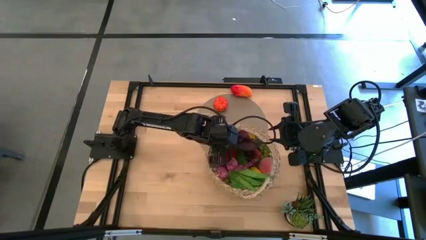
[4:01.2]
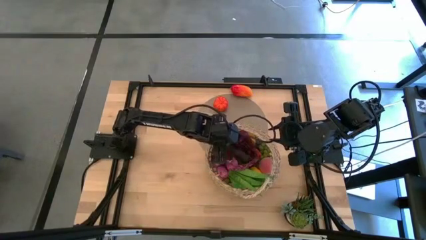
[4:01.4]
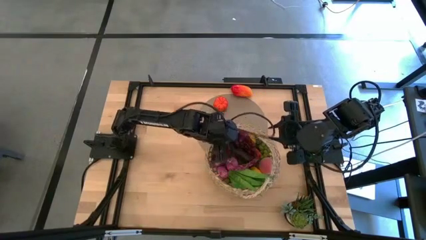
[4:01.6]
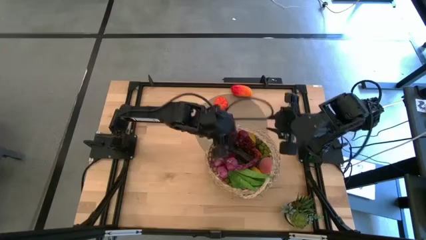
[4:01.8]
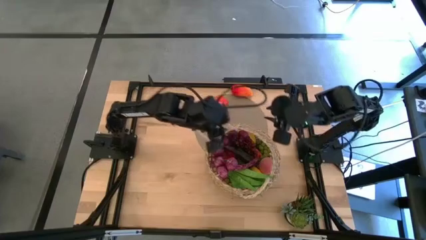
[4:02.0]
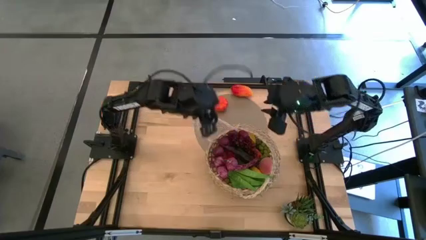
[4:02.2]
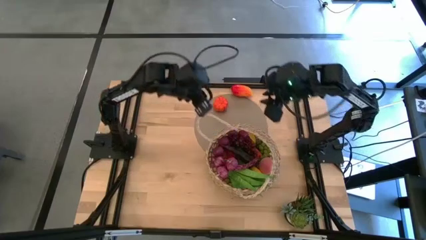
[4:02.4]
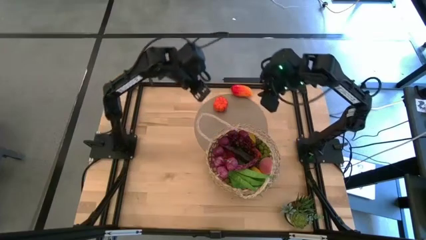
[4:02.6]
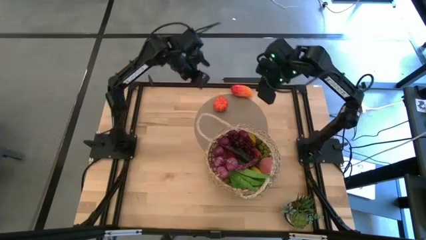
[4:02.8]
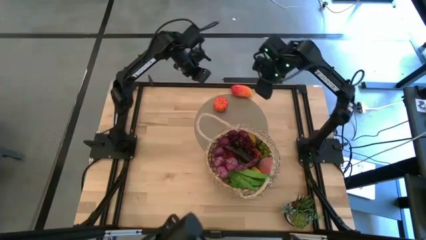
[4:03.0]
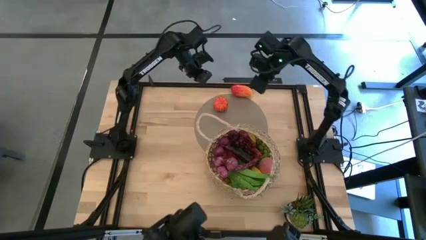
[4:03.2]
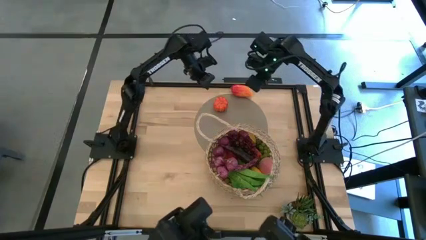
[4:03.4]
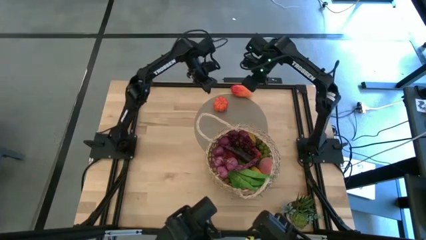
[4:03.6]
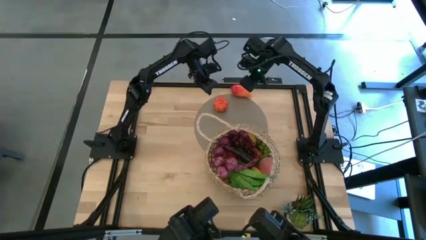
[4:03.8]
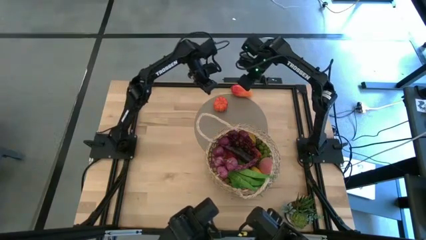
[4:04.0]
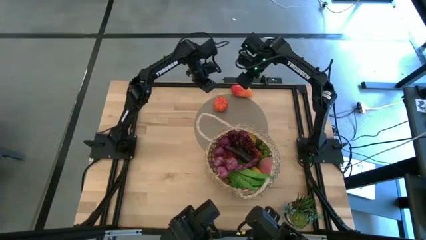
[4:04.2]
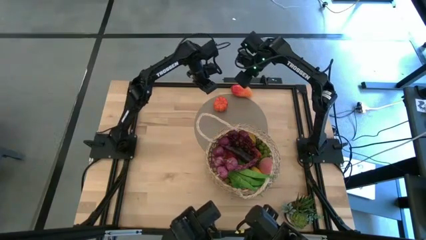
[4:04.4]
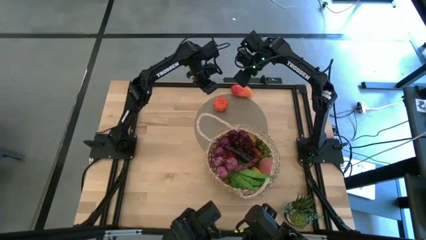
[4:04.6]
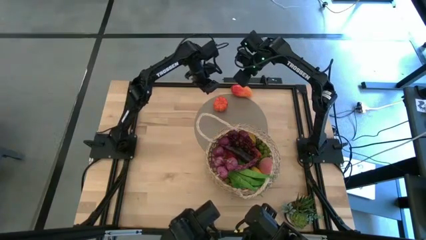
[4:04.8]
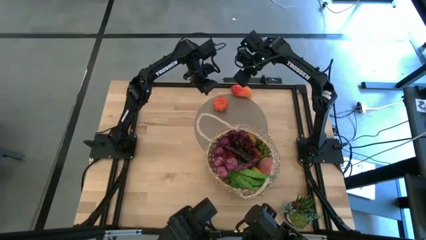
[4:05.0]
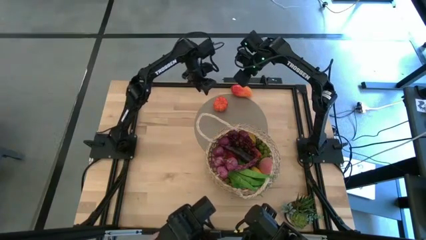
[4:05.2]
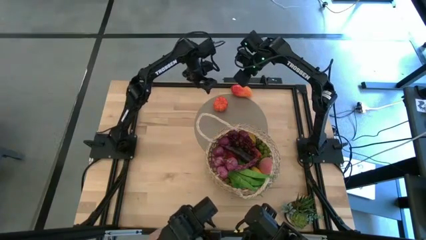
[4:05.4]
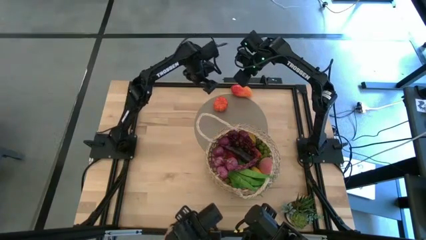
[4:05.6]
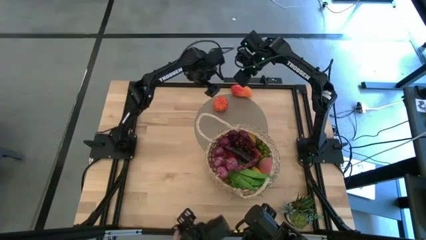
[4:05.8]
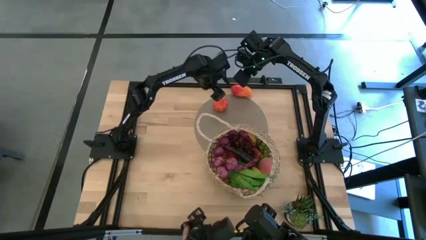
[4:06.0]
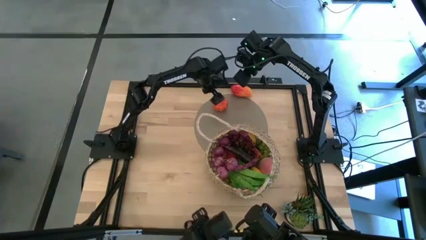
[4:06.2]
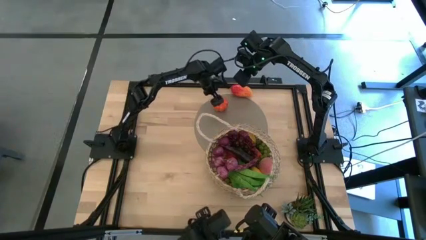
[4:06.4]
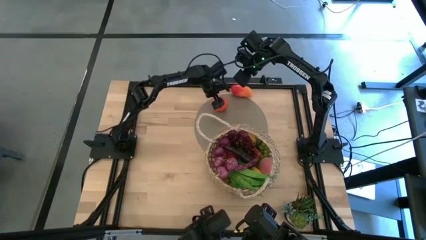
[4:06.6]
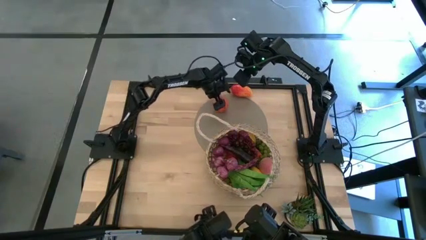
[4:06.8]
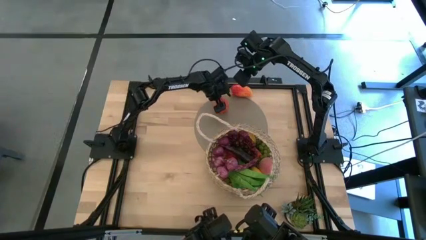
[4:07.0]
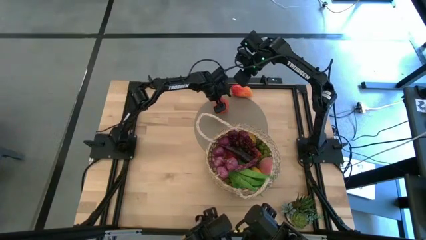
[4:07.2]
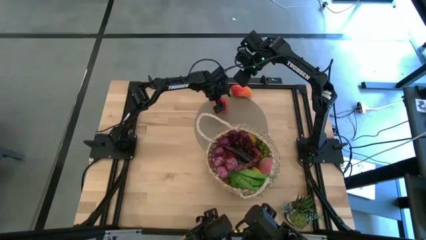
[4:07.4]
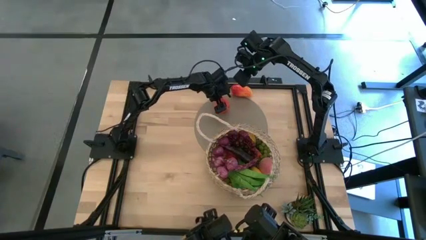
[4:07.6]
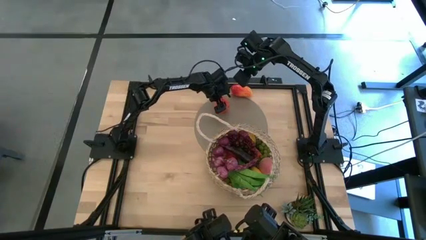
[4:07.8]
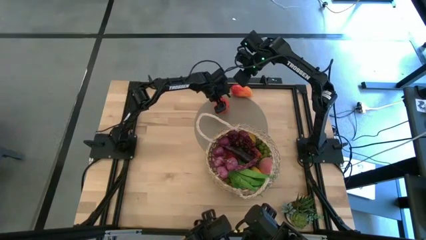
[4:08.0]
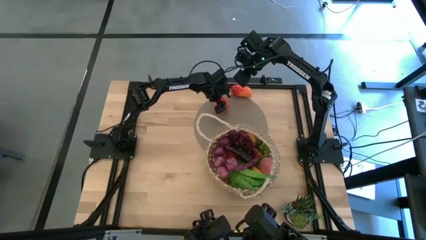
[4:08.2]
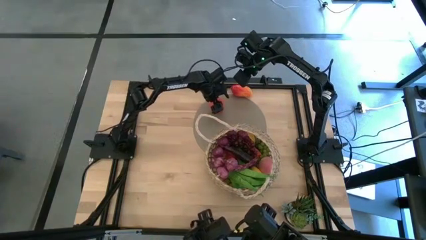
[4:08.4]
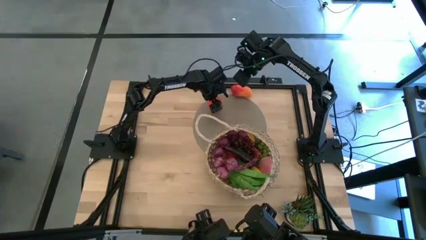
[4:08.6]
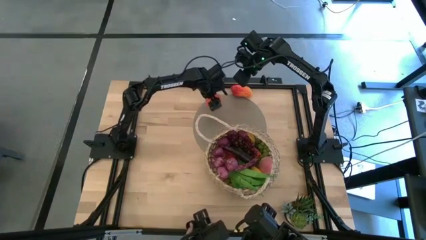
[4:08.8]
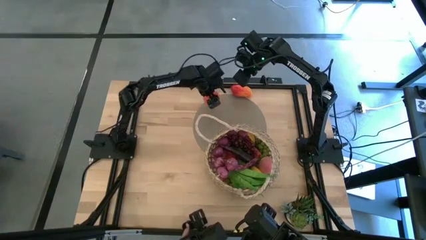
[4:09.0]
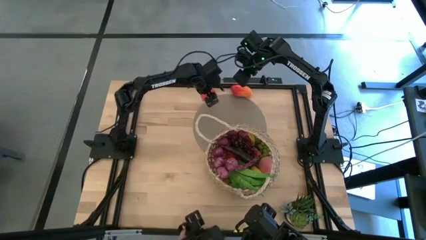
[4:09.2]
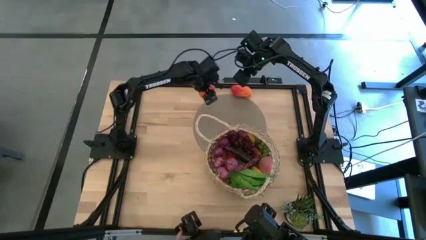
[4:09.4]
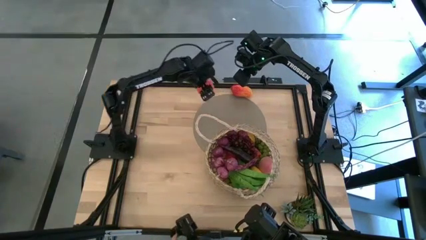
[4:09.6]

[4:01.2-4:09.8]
Task: Build produce basket
Put the orange tangerine into the brown basket

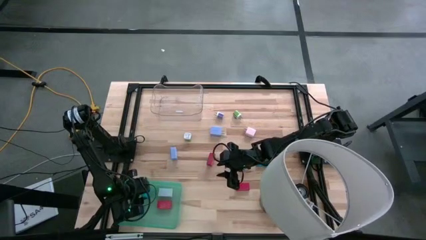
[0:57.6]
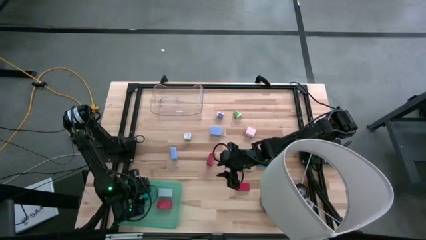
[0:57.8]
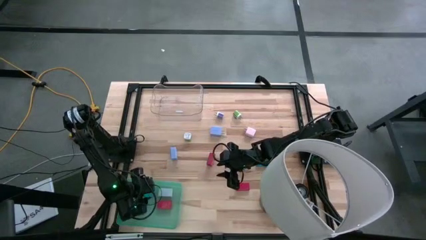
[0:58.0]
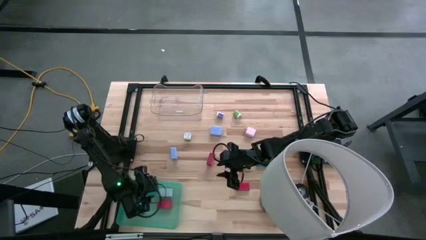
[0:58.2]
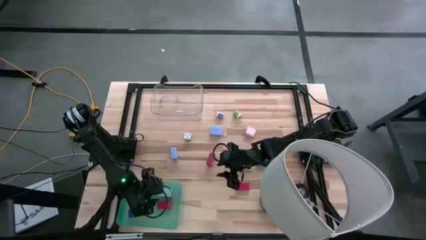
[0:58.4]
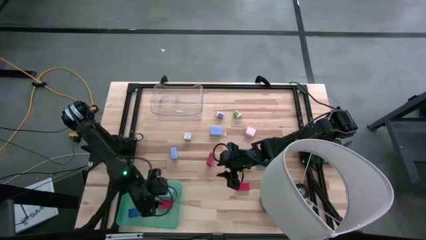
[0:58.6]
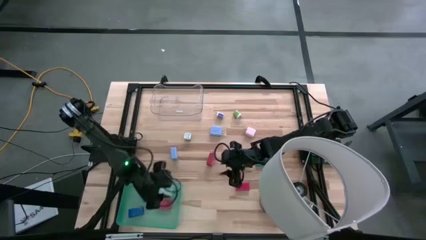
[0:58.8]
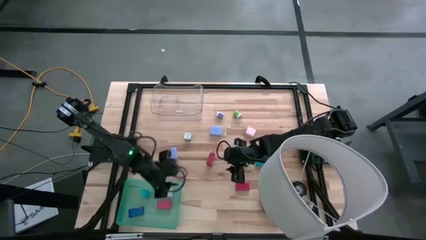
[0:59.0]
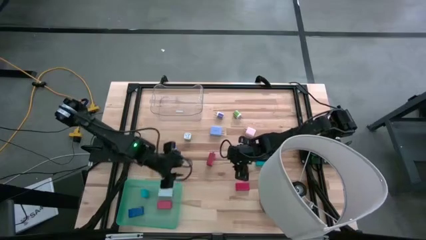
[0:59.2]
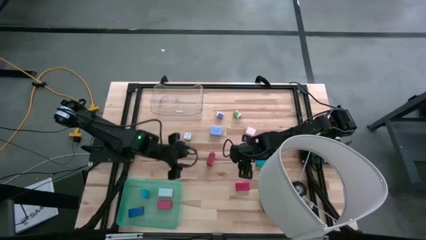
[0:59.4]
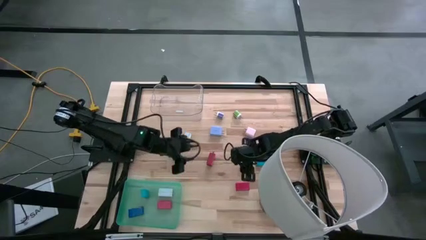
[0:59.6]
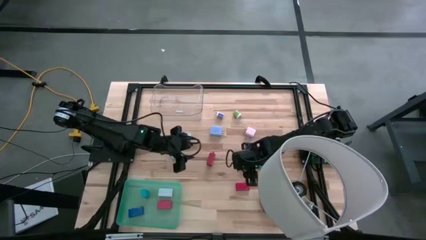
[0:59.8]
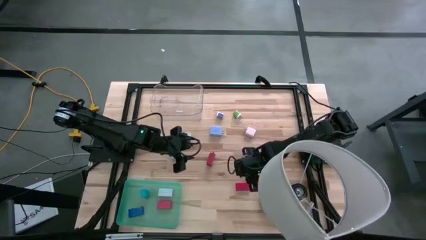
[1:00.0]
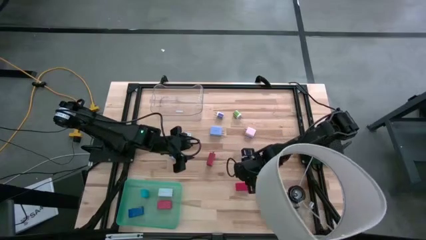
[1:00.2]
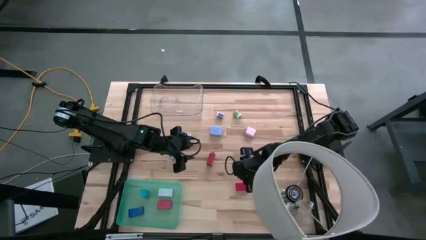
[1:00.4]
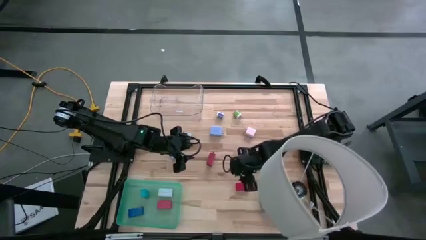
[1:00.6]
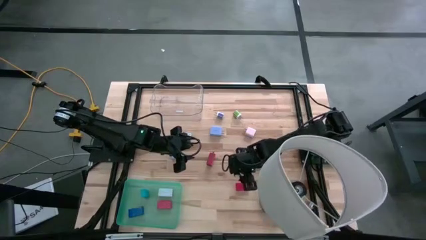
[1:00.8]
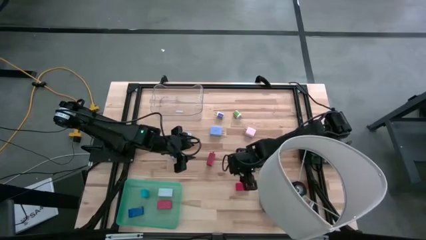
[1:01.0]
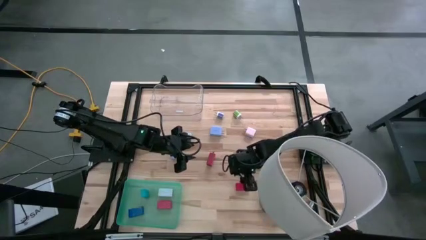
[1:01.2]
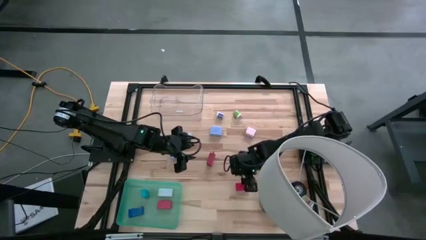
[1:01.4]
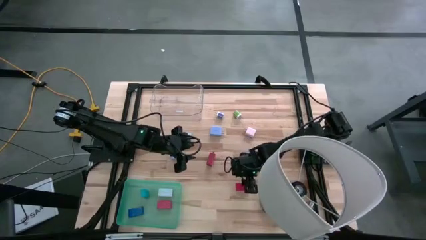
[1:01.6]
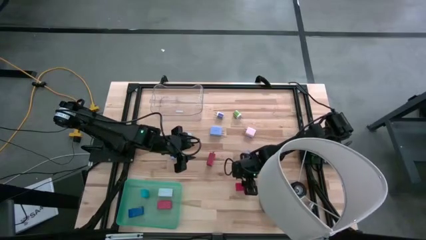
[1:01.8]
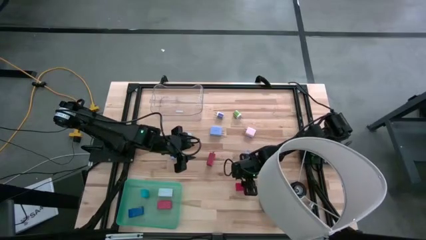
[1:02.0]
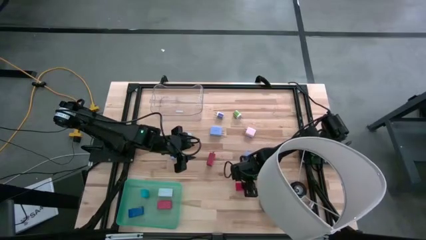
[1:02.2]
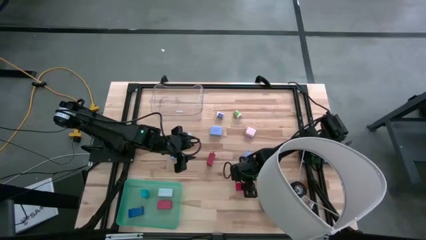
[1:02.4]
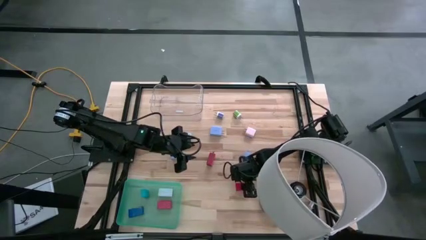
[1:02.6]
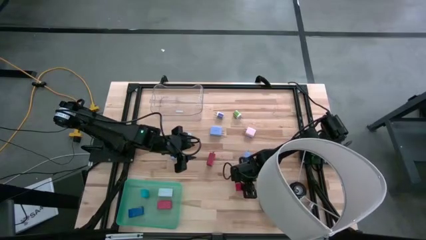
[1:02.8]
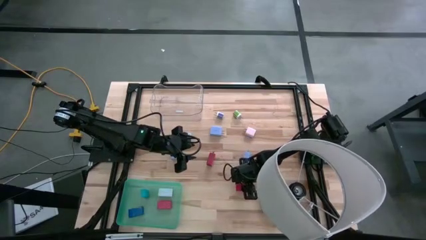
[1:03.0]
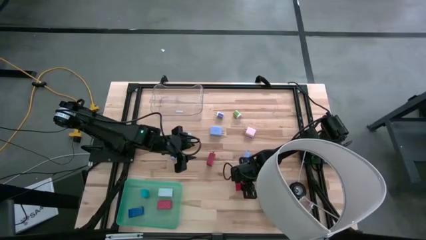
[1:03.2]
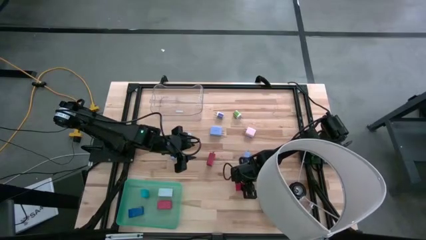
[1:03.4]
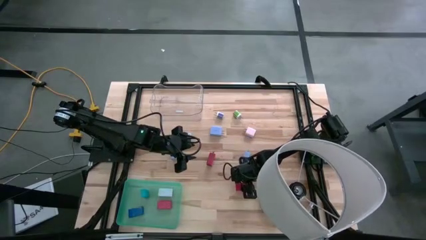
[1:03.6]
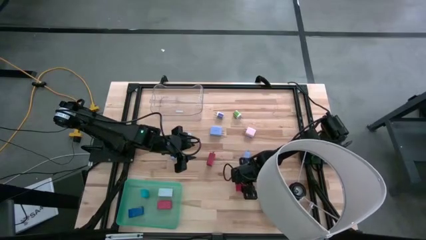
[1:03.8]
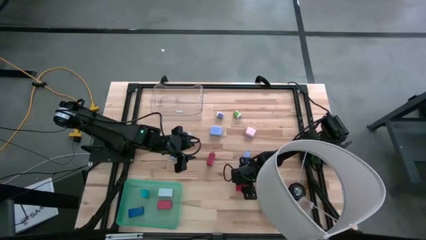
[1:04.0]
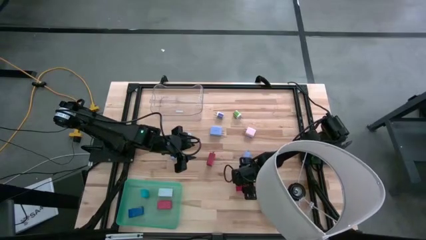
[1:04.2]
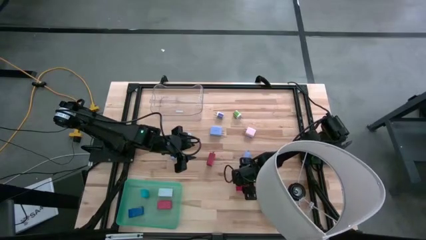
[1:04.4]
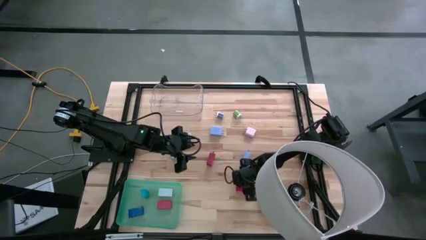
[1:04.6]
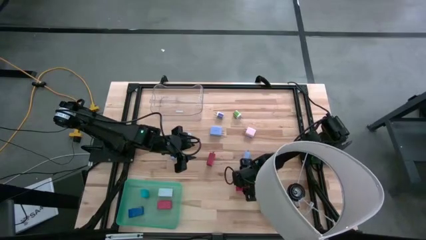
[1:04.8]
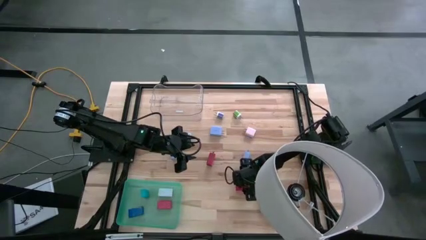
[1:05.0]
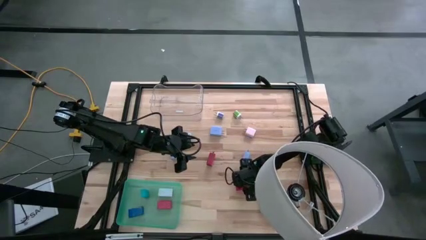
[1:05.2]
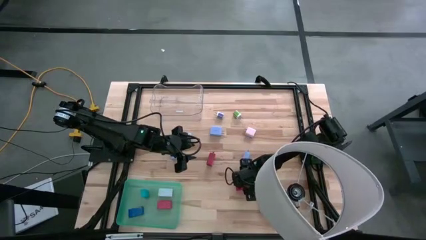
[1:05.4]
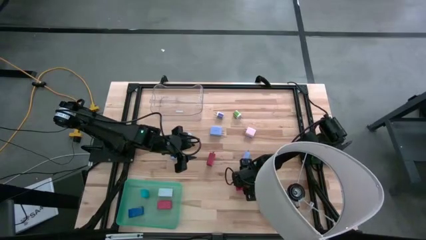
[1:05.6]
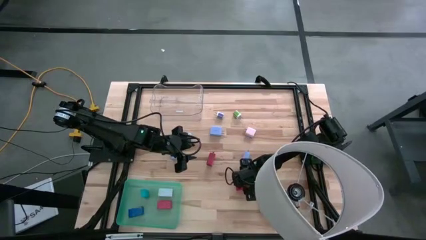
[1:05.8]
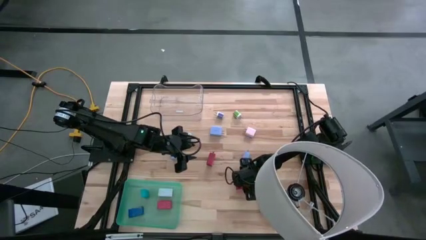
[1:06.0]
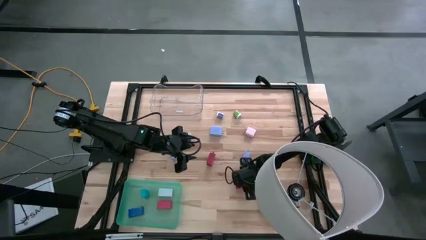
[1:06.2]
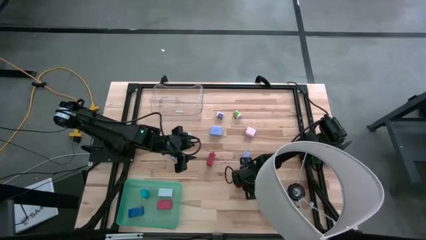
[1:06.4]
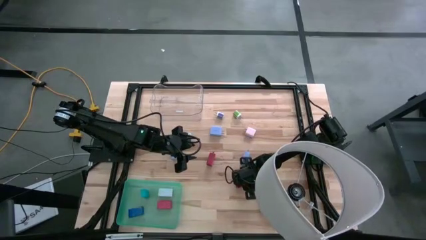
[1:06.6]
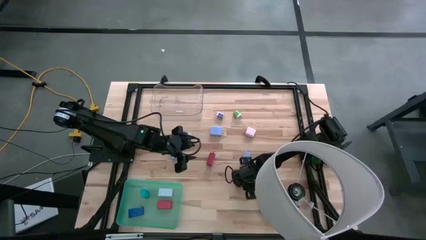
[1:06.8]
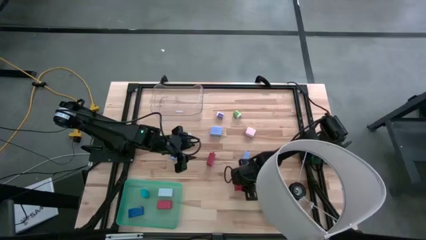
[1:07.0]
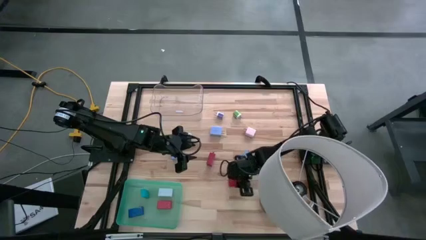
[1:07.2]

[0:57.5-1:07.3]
Task: Pick & Place Office items
Put the red digital clock into the green bin
